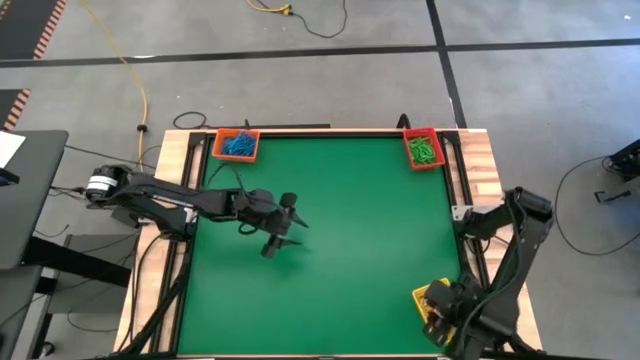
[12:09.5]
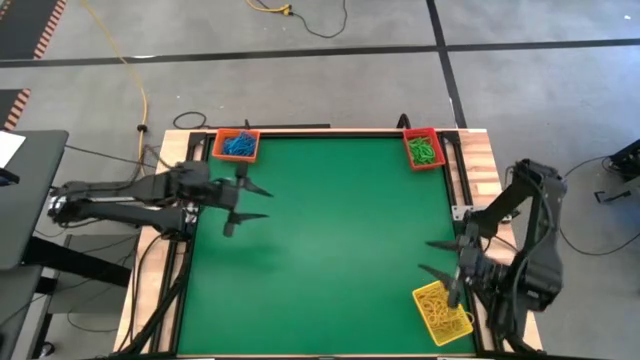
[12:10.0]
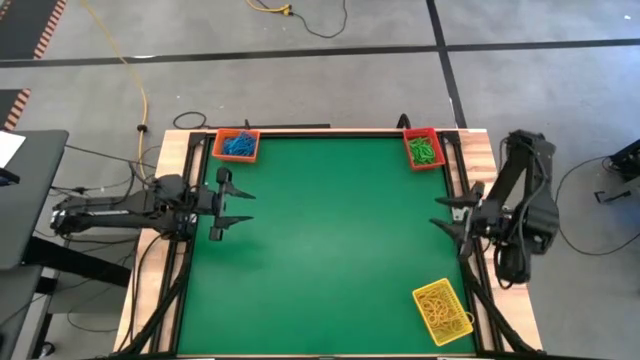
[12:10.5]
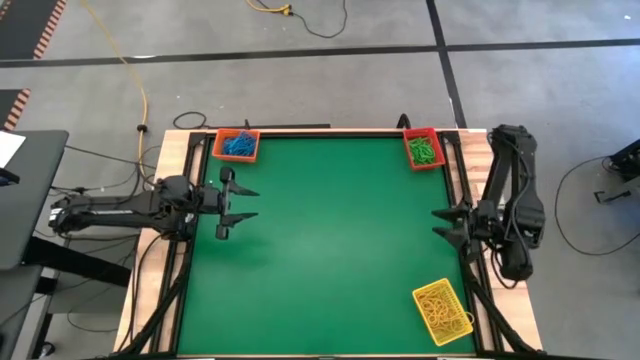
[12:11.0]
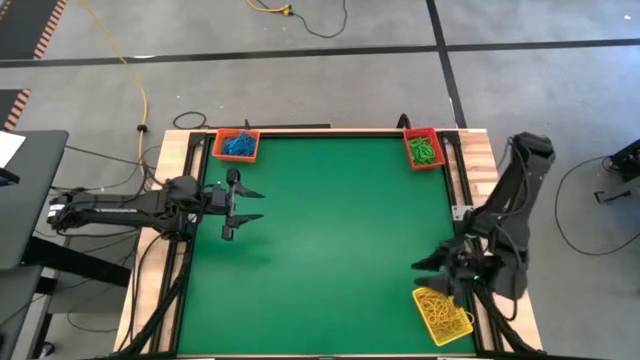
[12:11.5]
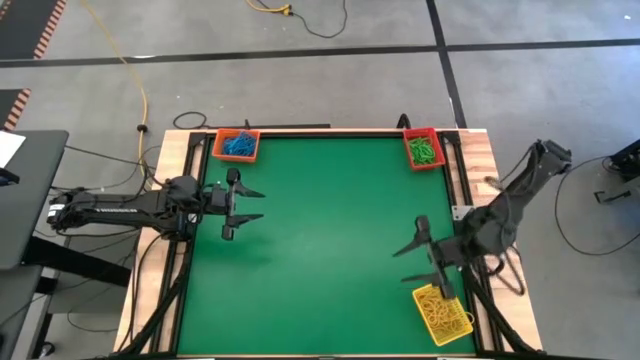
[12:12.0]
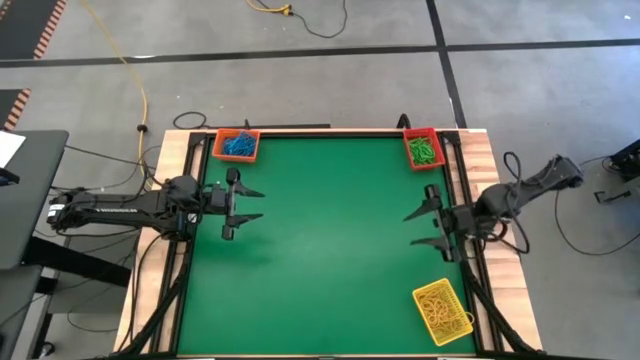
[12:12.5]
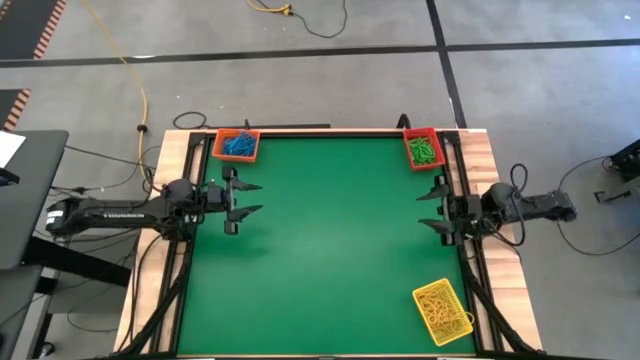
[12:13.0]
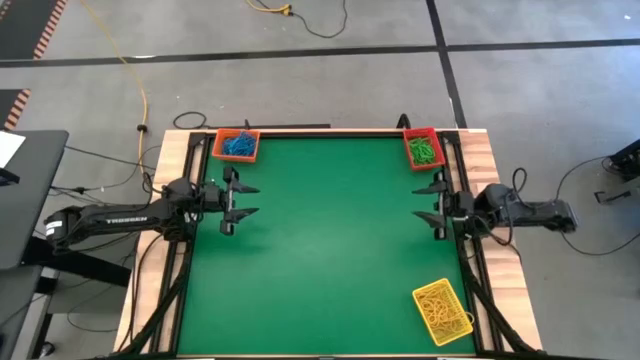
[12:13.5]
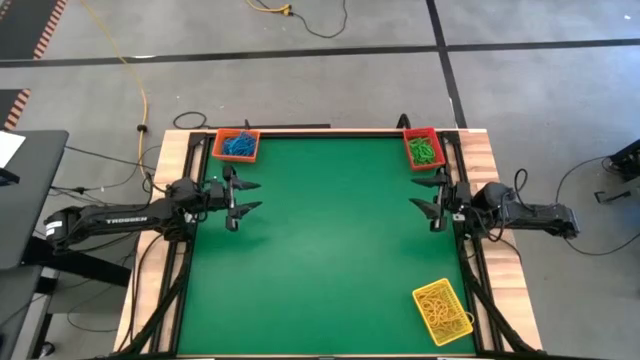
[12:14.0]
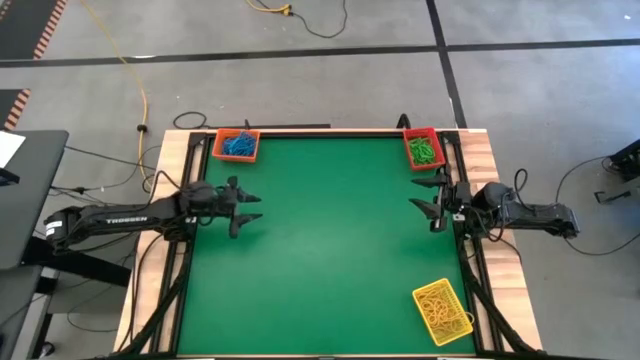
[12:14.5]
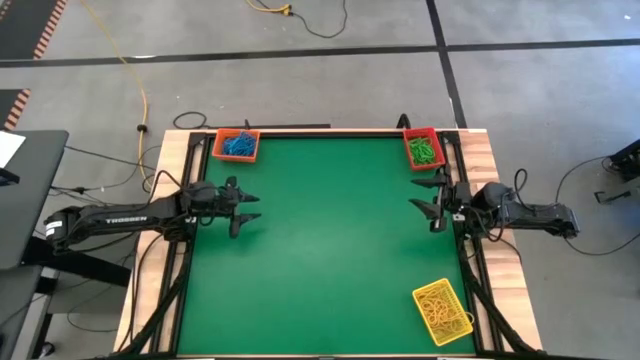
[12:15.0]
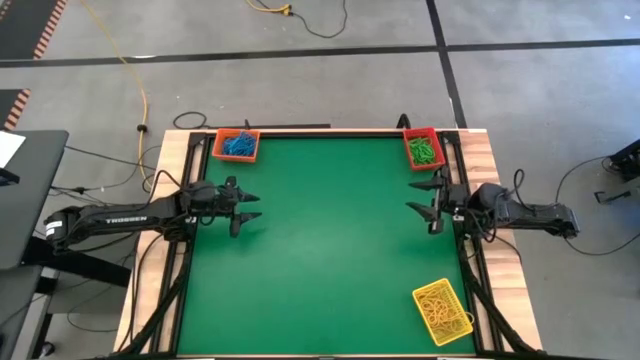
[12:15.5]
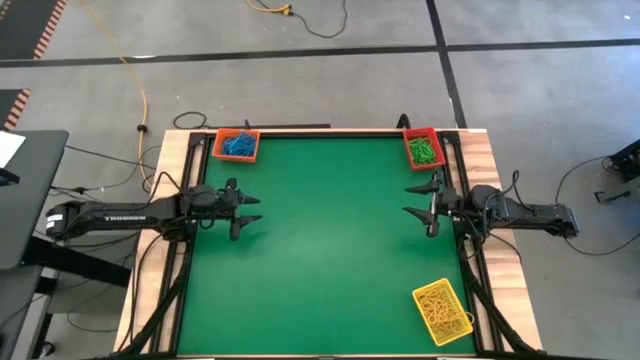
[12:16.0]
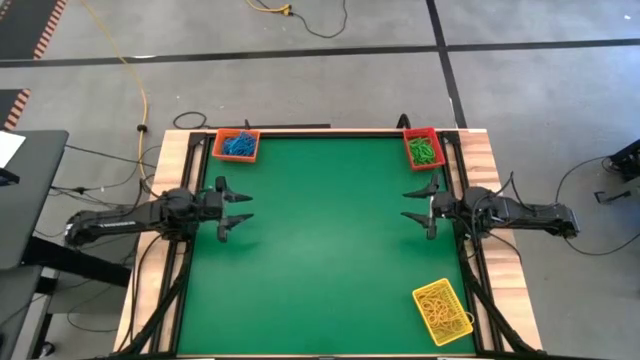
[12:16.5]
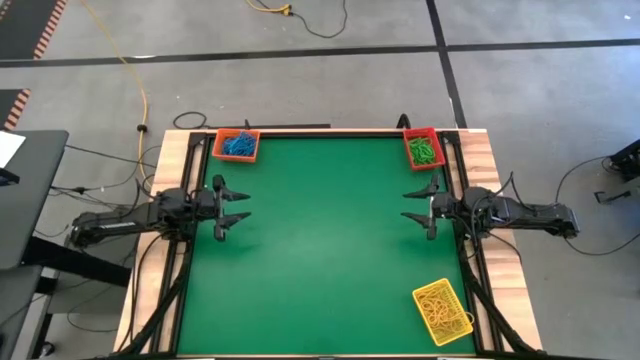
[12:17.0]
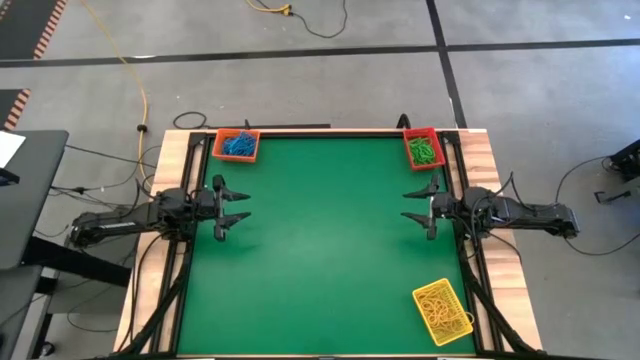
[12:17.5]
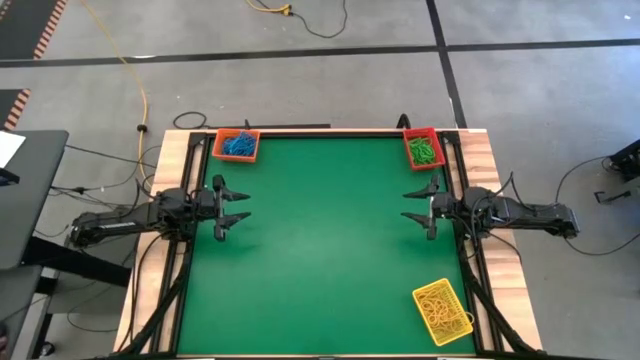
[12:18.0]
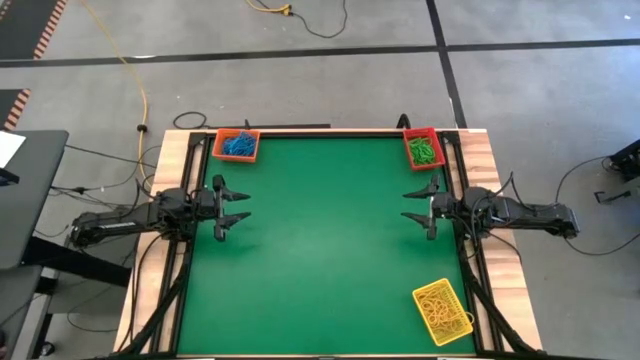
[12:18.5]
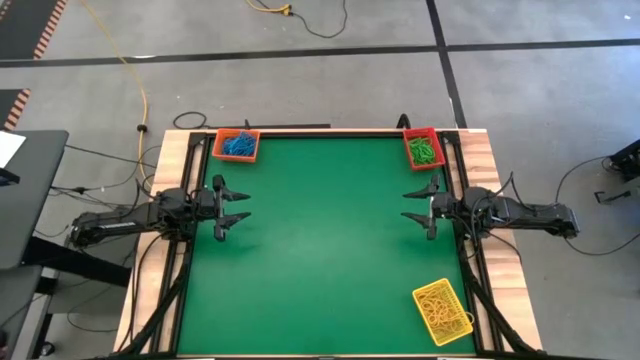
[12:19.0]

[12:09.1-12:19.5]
Task: Sort rubber bands into baskets
Return to Home Position
